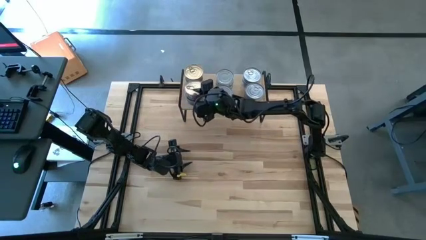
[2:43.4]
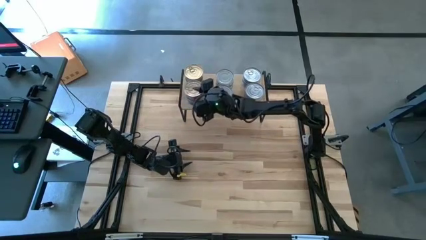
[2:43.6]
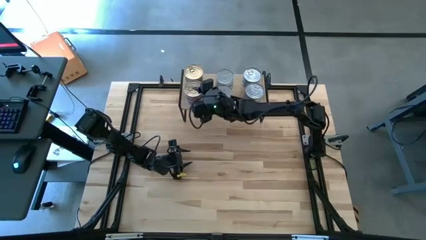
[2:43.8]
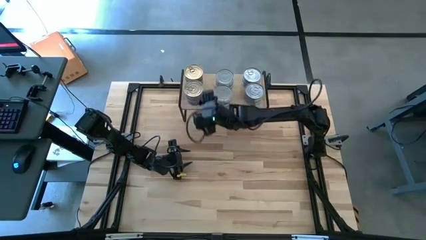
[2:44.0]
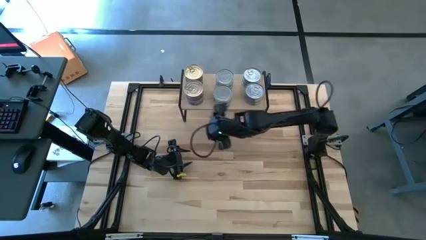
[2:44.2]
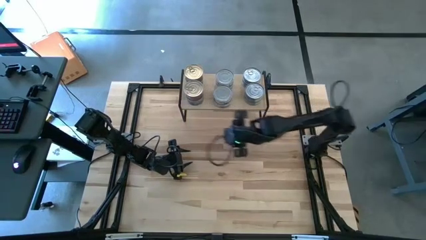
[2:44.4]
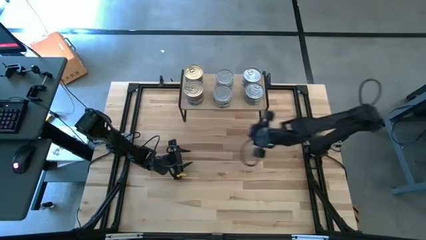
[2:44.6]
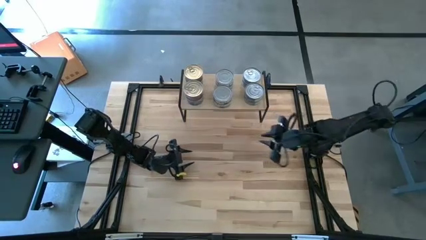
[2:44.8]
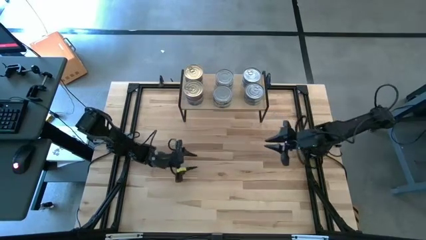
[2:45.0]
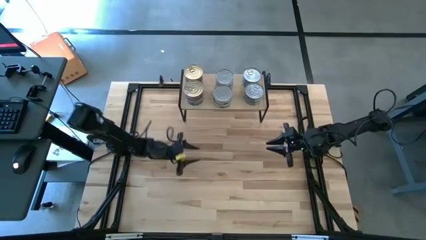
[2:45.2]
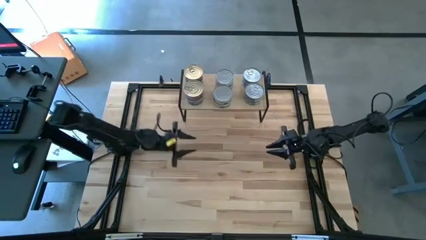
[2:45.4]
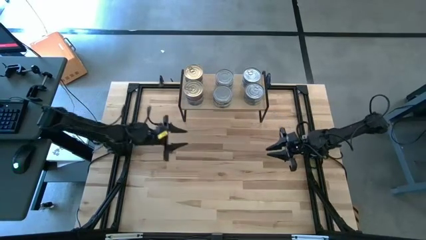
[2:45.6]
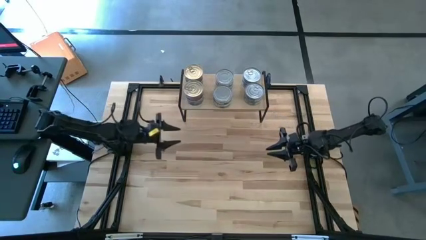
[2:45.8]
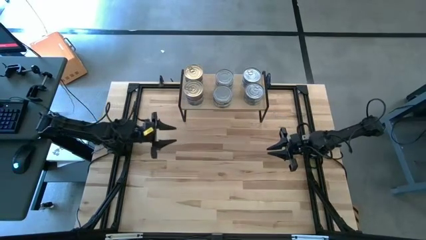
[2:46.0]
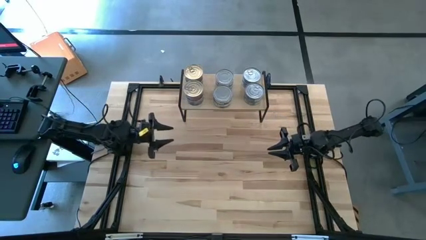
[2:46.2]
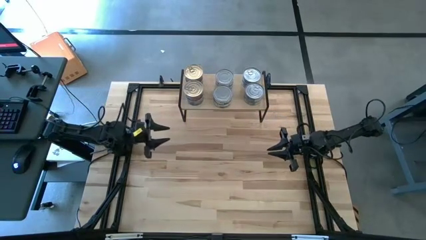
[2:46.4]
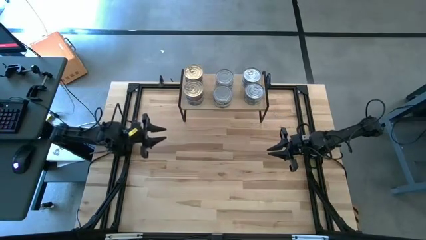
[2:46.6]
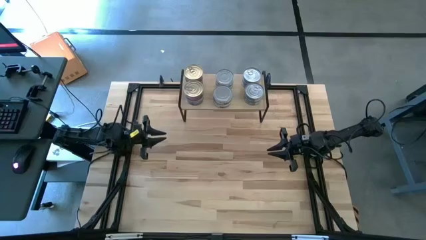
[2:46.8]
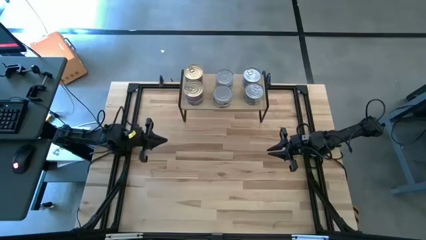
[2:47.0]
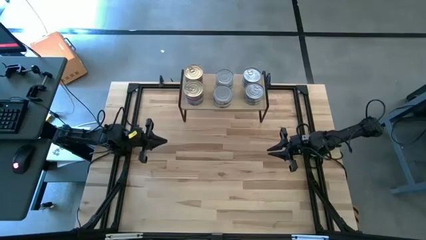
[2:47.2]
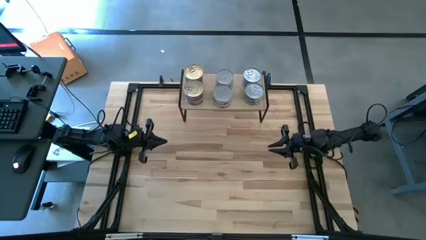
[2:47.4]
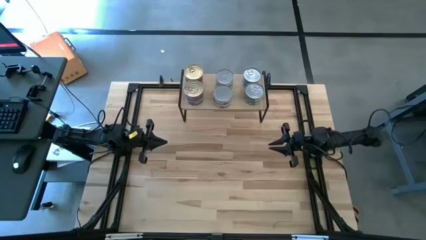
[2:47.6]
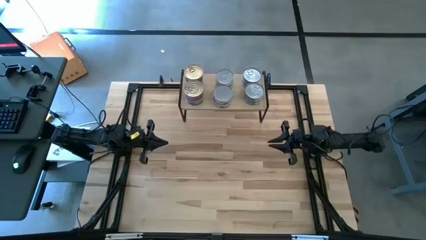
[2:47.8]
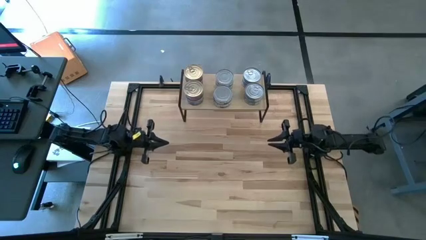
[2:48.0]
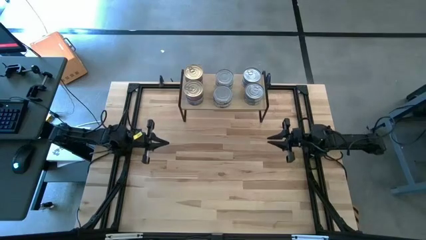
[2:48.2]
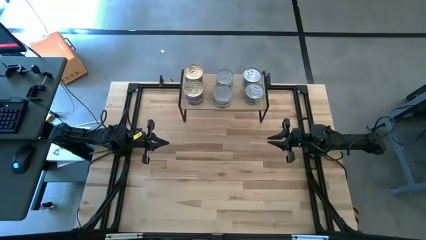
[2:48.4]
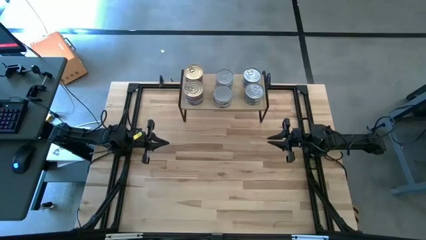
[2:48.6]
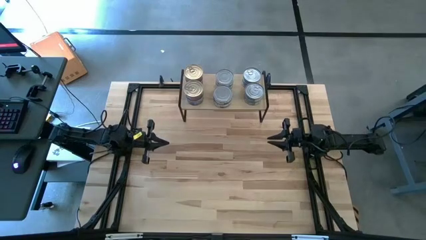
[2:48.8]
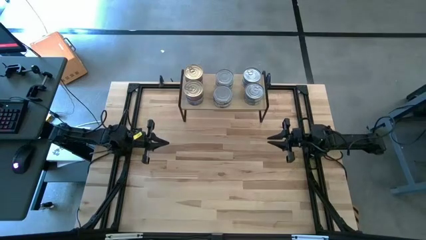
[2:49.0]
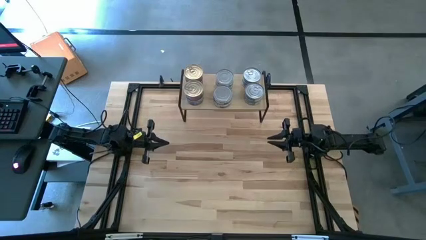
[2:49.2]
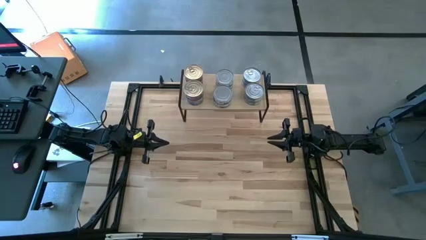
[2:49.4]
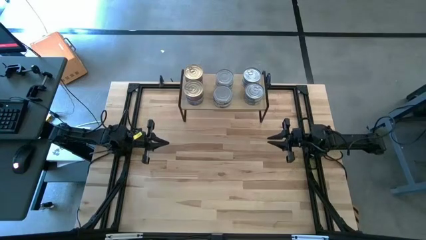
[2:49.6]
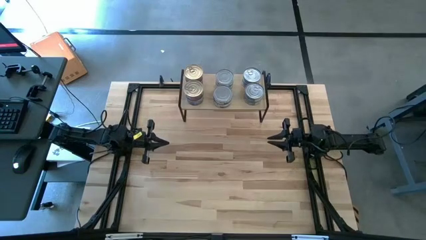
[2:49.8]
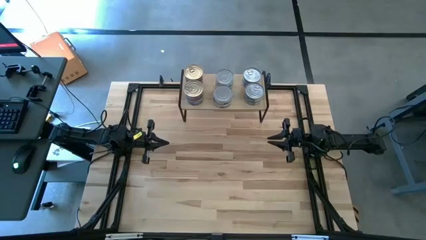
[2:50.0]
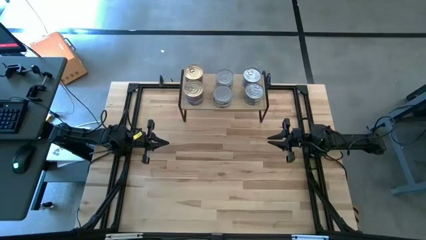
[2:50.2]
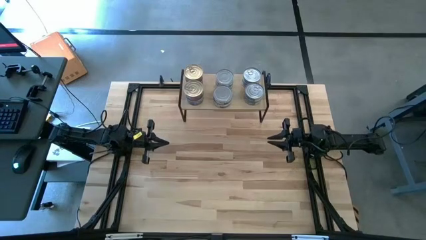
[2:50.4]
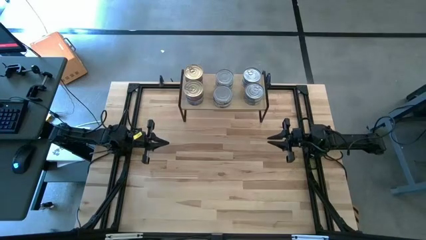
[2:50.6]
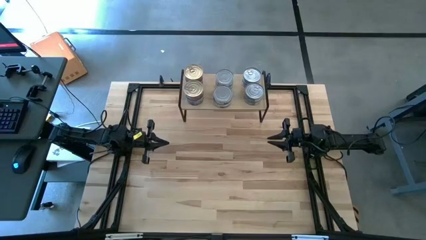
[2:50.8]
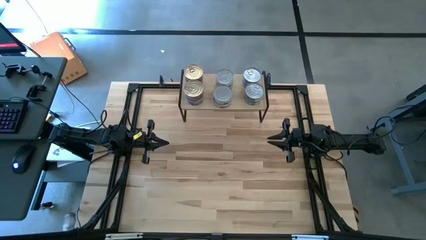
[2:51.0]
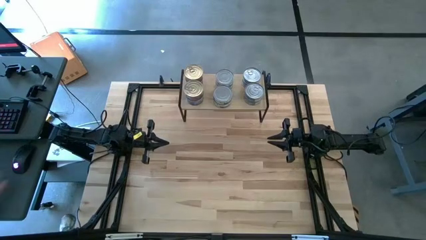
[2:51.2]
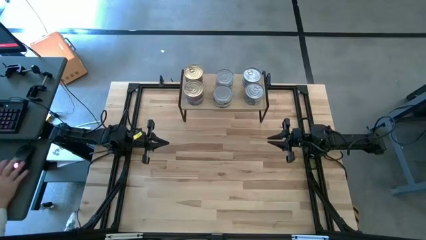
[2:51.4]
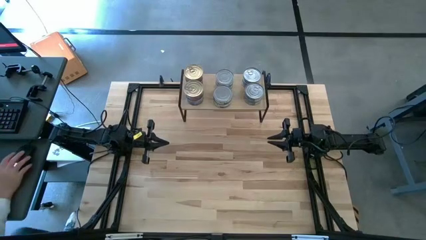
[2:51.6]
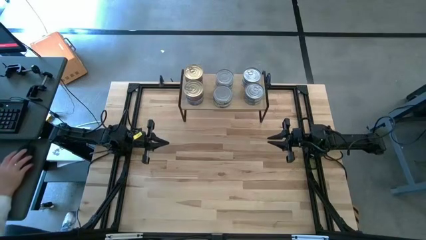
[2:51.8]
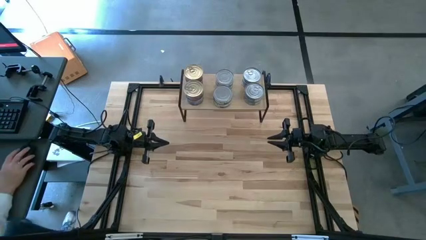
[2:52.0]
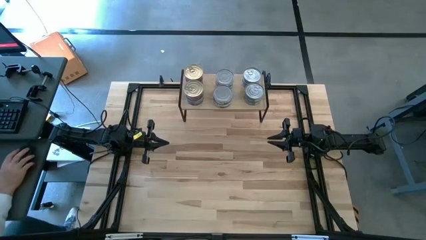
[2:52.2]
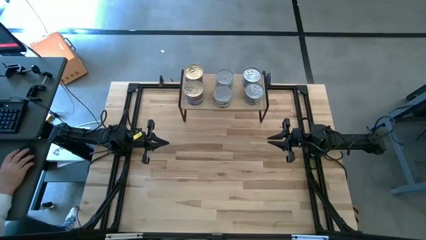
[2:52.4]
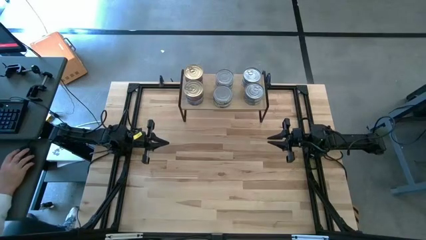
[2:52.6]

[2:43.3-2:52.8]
Task: Stack canned seafood by type on shelf
Return to Home Position

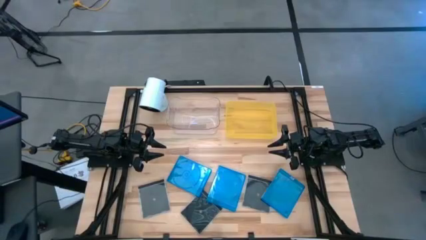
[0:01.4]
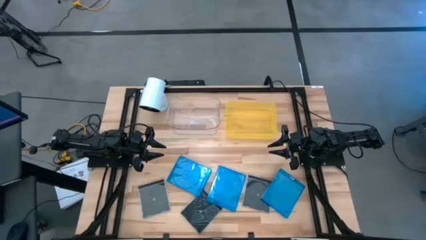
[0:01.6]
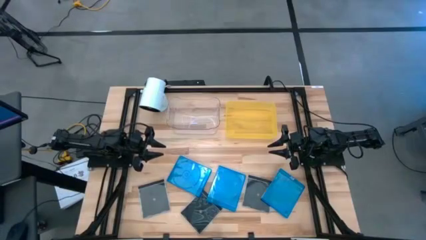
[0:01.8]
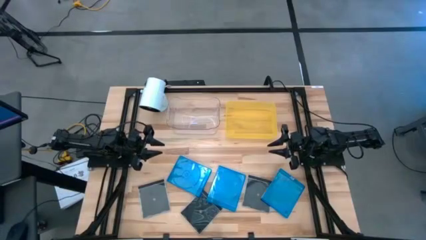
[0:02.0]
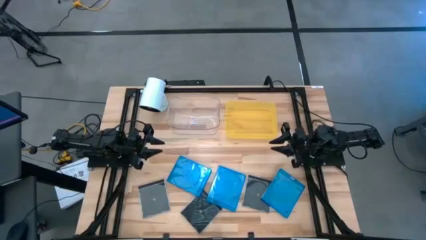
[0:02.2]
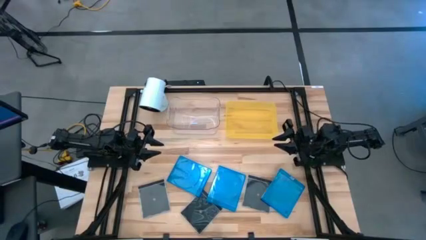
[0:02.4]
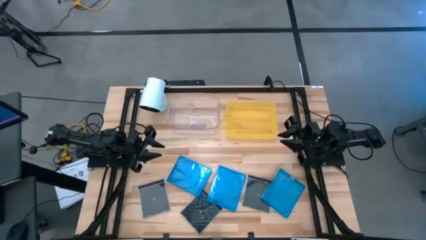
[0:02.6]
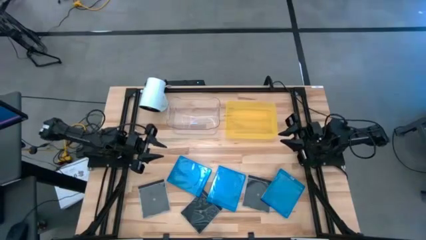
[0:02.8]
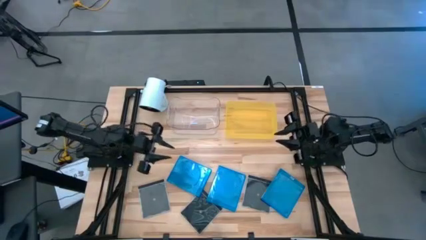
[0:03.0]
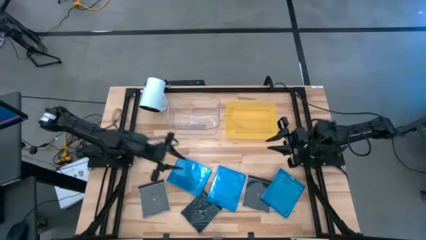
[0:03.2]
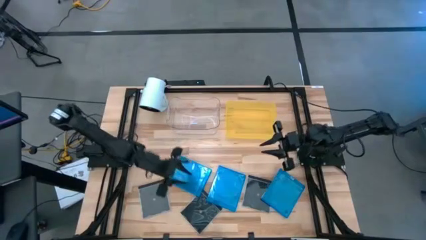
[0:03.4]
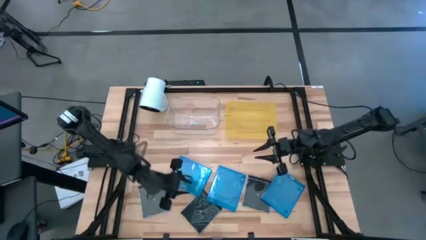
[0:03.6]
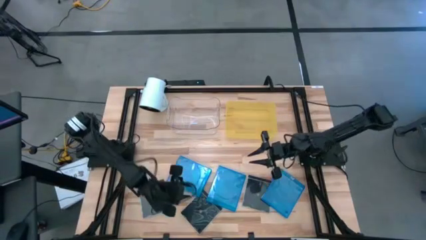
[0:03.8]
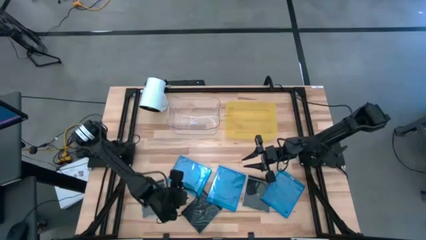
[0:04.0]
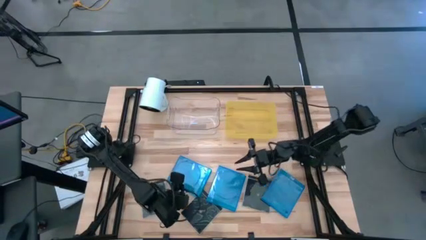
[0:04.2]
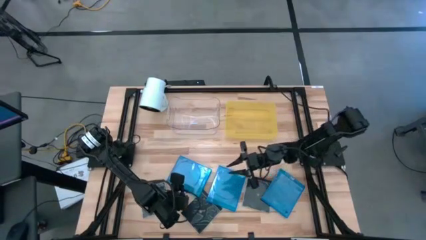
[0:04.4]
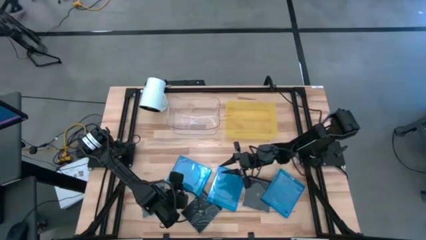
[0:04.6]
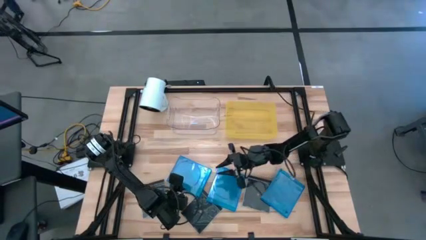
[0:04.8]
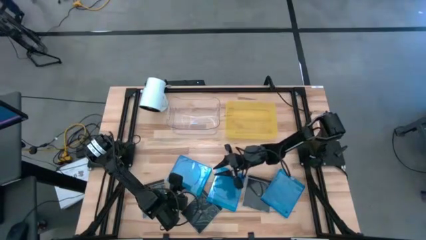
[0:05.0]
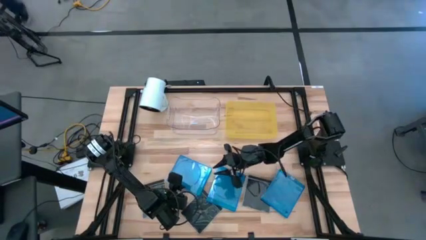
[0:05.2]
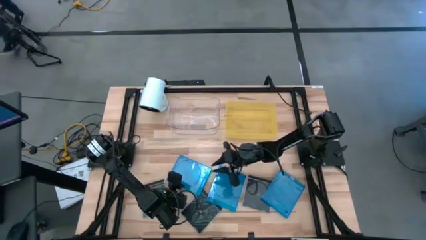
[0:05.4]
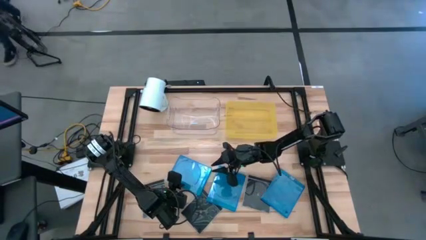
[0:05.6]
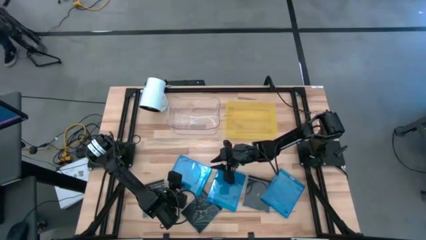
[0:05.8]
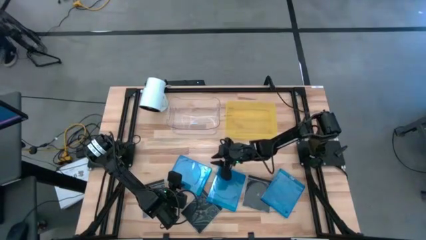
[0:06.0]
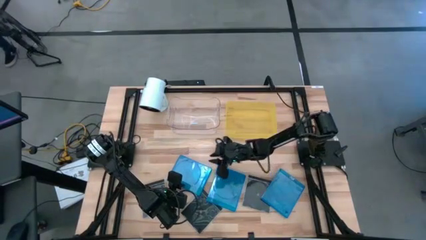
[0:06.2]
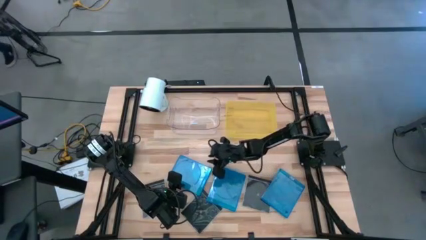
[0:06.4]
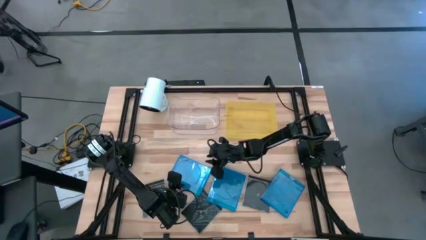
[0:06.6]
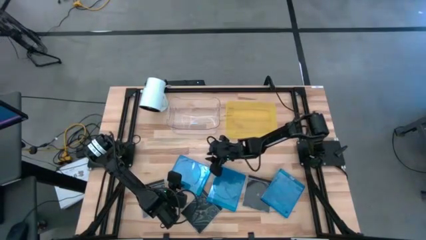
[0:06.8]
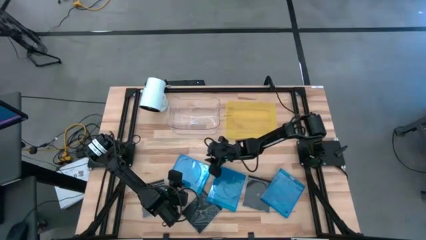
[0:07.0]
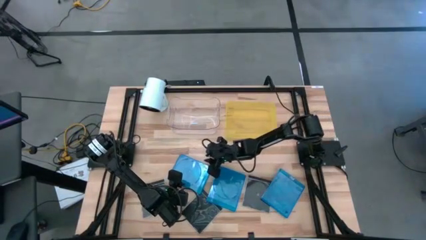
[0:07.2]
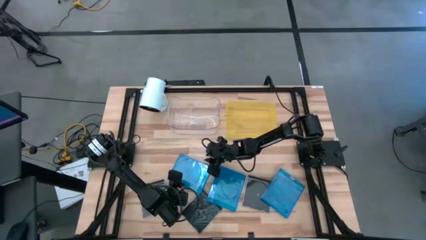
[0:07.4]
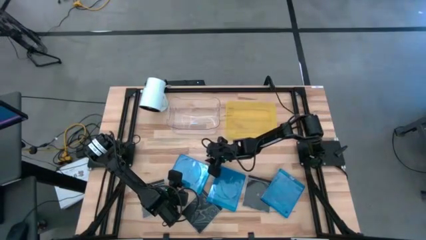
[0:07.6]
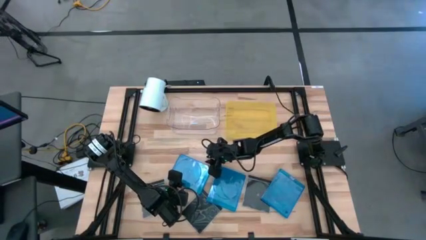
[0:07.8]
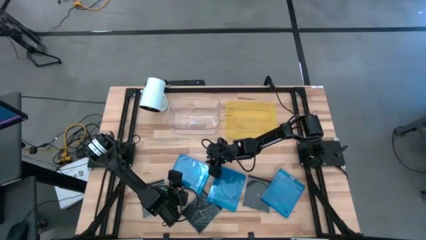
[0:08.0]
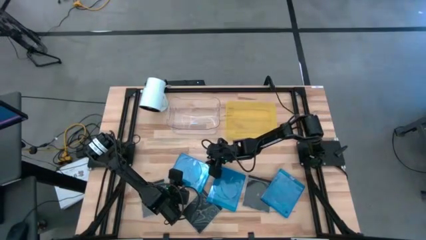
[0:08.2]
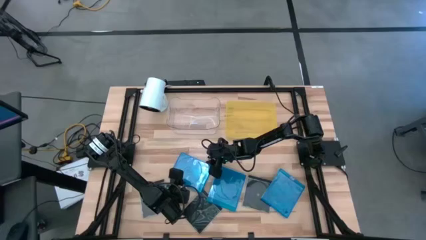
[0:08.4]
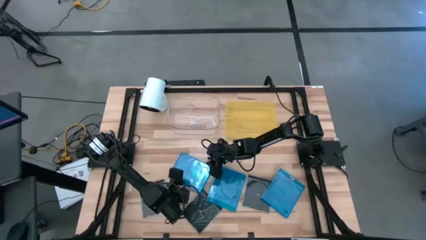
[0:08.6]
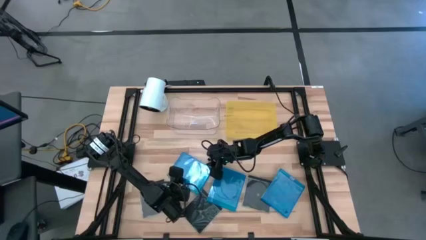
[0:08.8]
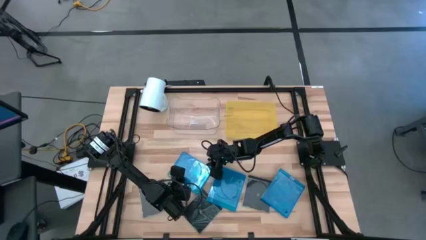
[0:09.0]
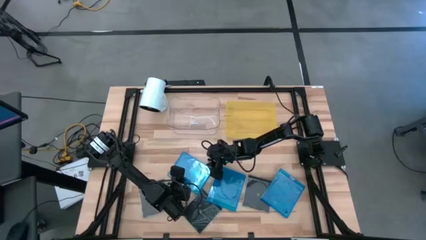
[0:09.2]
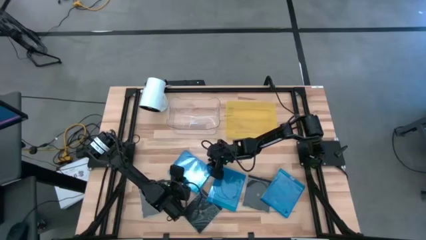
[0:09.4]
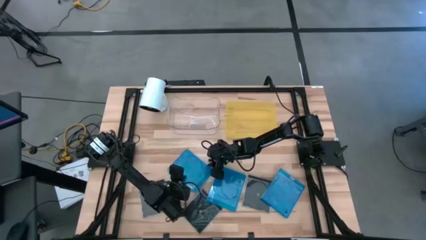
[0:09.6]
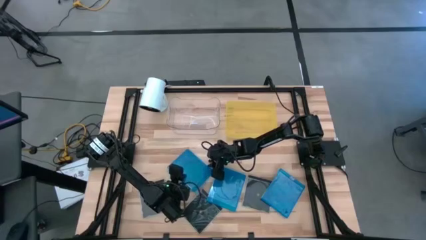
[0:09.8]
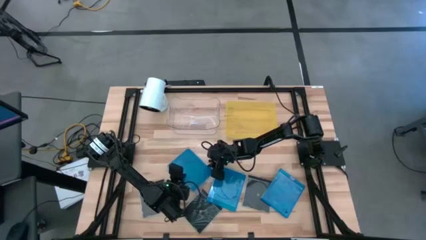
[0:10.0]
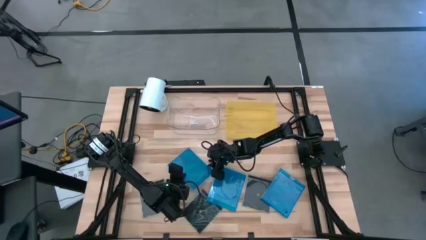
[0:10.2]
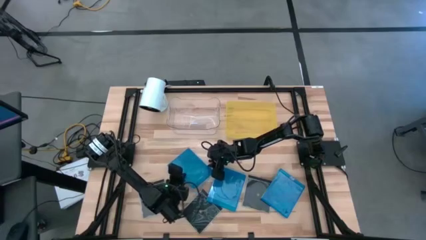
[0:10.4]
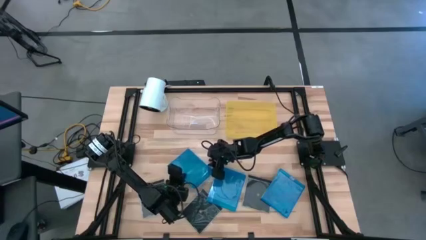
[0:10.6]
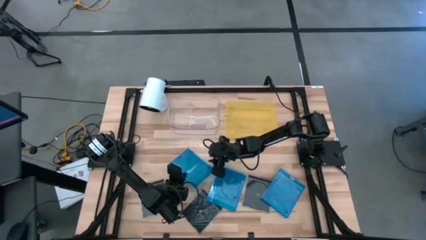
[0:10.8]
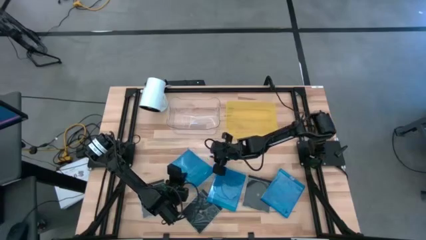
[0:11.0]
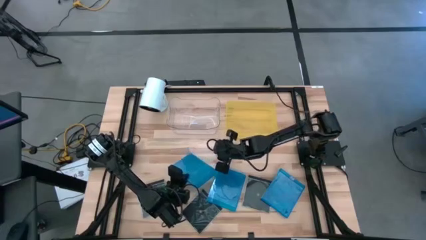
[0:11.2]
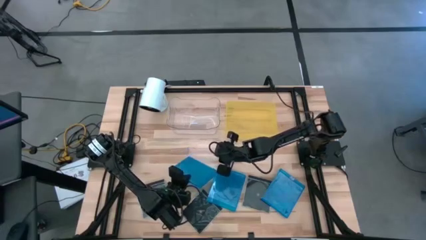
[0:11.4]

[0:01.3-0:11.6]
Task: Pick & place jewel cases by type
Put the left blue CD case into the transparent bin
